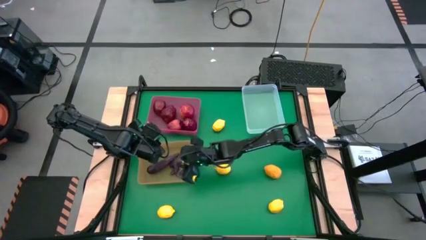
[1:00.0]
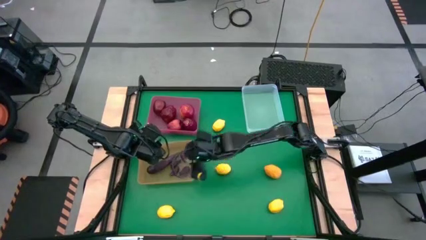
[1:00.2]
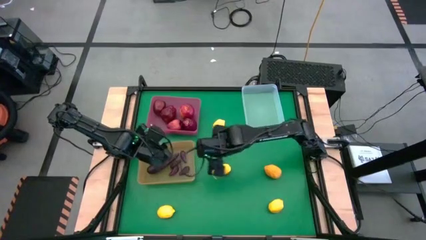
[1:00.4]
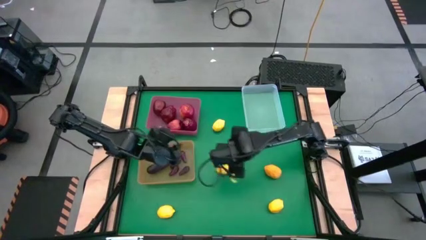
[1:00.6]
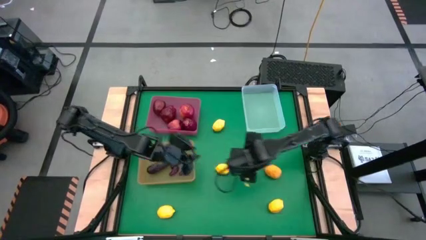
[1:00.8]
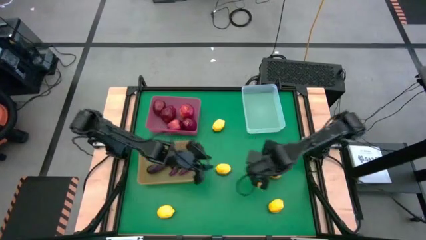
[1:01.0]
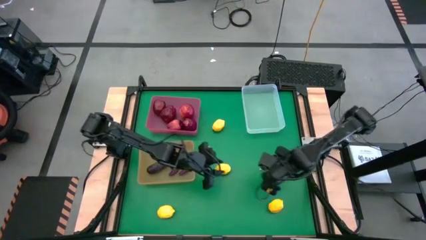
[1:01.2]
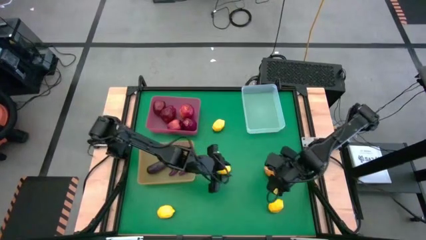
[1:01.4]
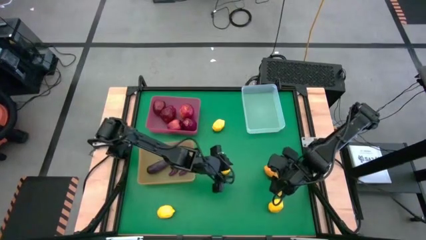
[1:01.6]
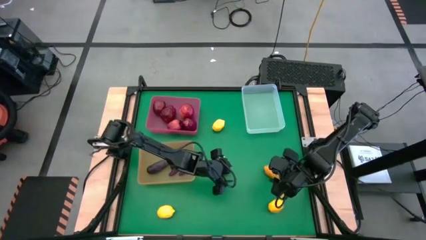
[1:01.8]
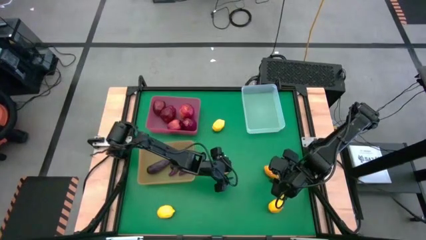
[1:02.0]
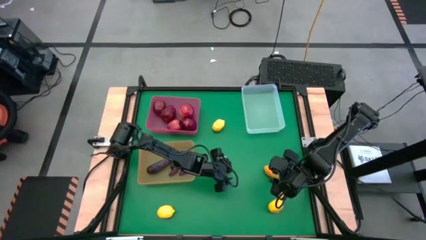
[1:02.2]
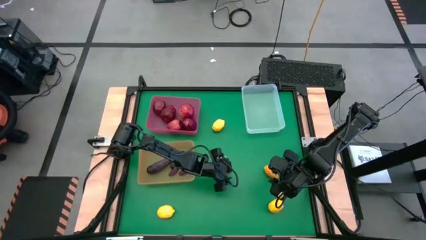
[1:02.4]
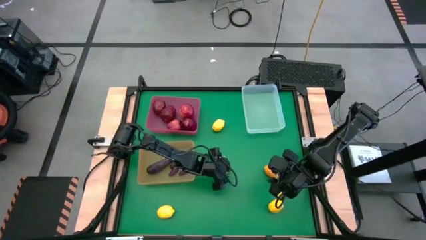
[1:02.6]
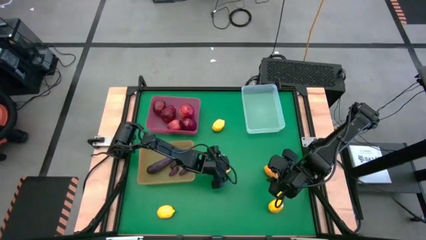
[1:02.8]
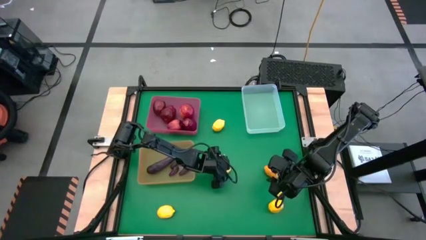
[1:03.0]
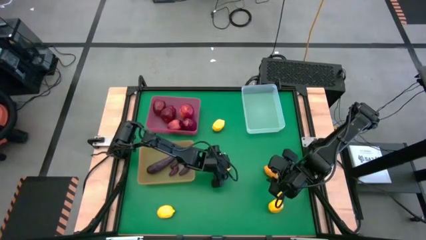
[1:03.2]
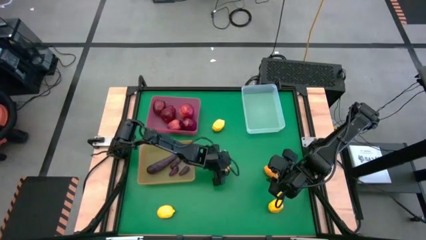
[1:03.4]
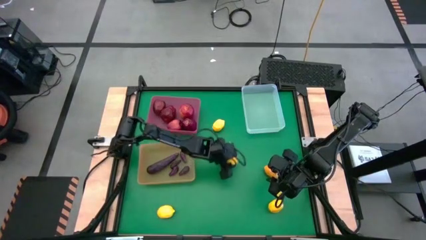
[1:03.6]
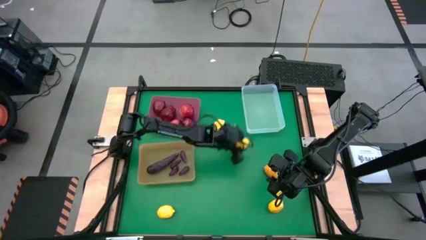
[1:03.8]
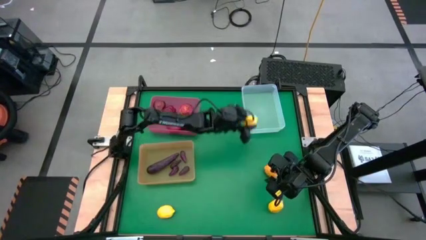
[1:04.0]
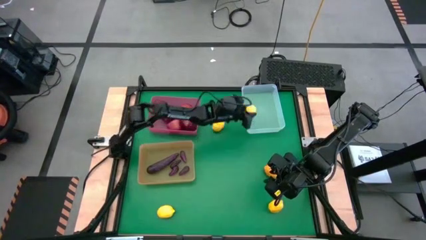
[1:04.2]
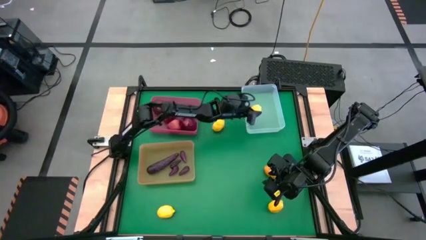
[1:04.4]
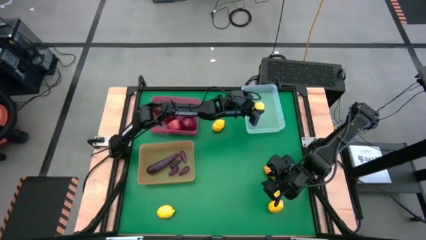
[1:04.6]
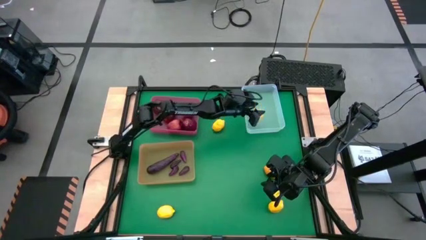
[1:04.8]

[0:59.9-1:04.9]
Task: Sort produce into baskets
Put the lemon into the transparent bin

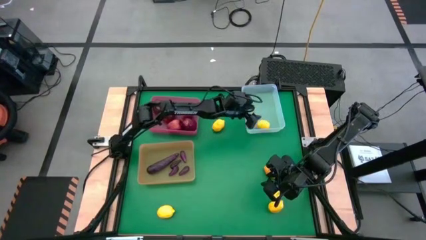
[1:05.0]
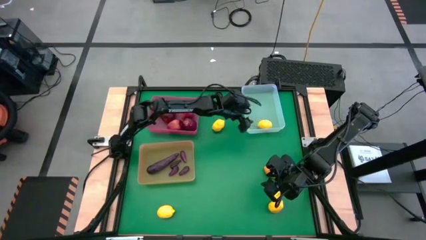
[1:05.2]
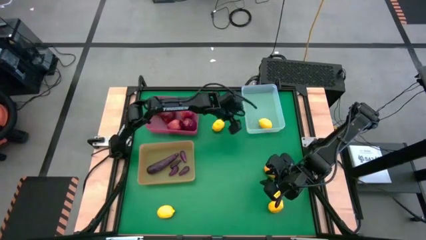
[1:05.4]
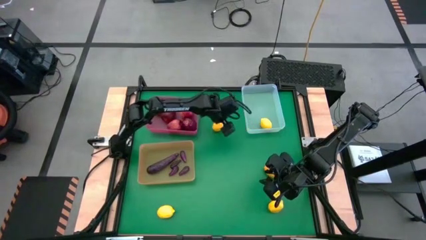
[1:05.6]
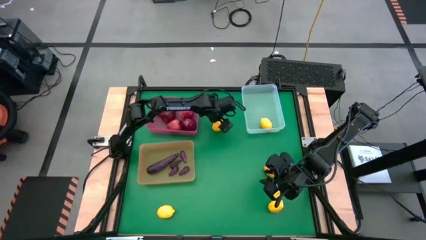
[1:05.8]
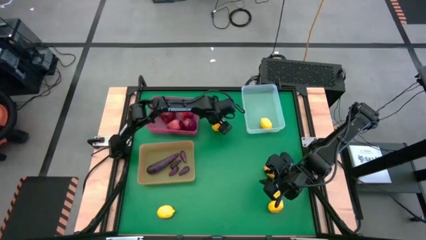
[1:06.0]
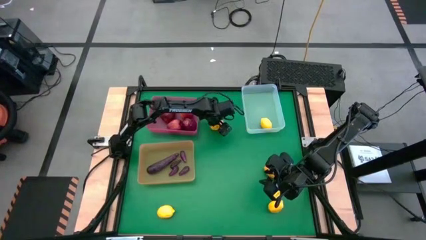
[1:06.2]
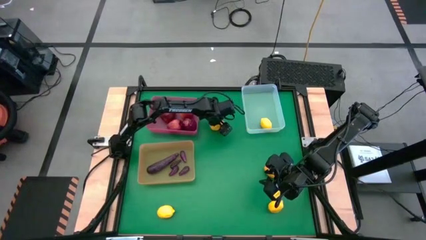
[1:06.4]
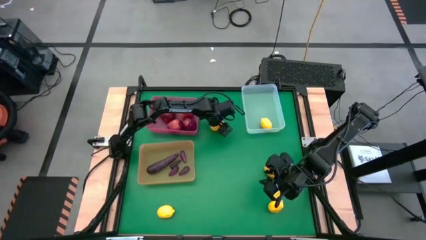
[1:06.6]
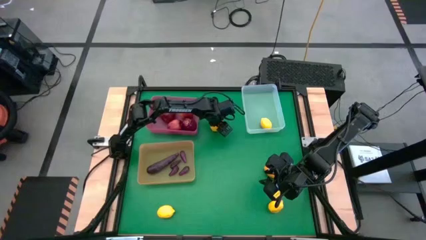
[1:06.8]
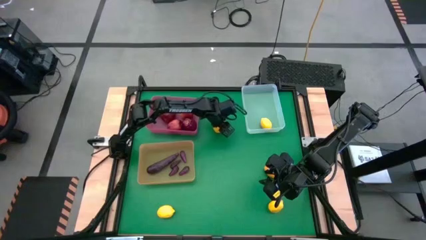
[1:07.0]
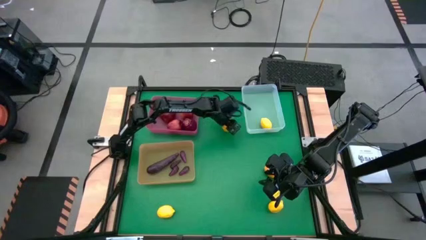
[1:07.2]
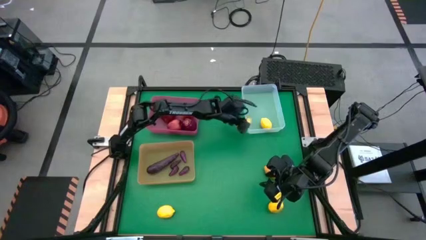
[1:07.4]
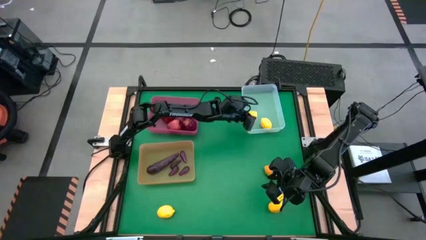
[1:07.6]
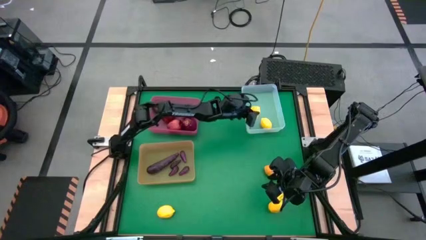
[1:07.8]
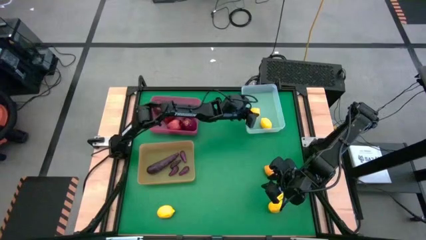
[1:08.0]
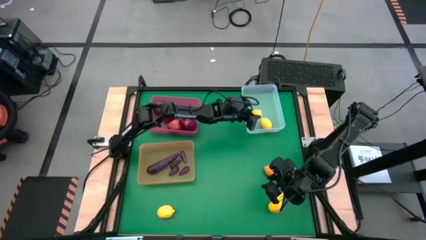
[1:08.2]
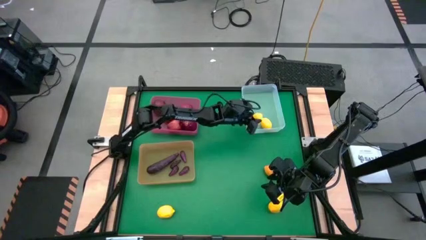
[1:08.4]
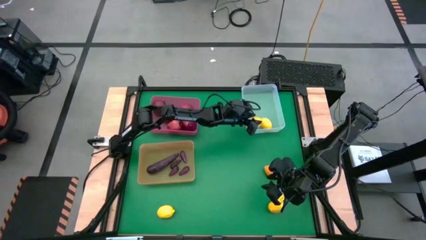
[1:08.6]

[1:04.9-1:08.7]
Put the lemon into the transparent bin

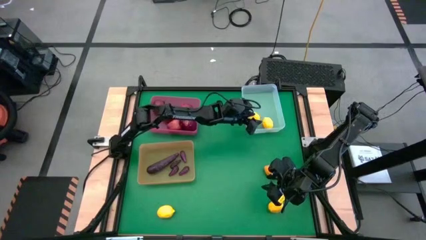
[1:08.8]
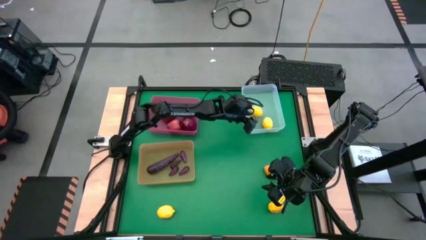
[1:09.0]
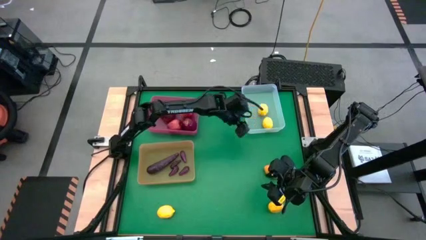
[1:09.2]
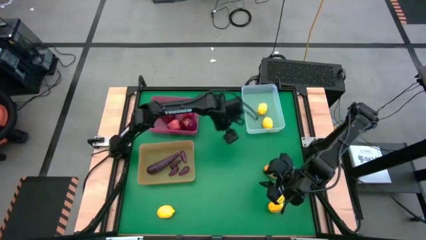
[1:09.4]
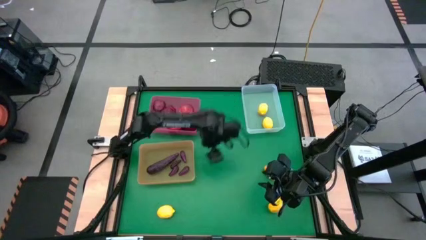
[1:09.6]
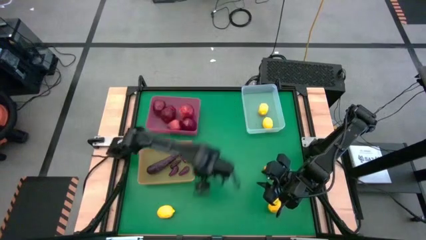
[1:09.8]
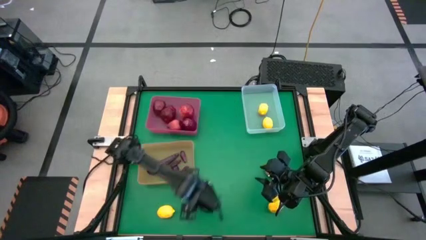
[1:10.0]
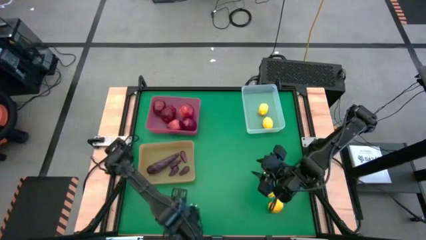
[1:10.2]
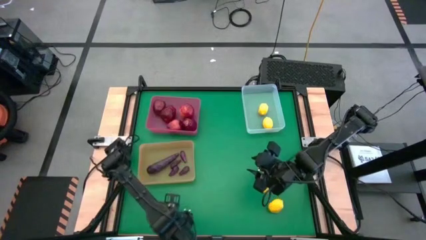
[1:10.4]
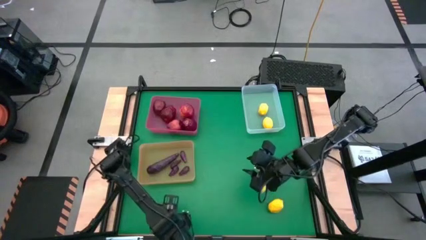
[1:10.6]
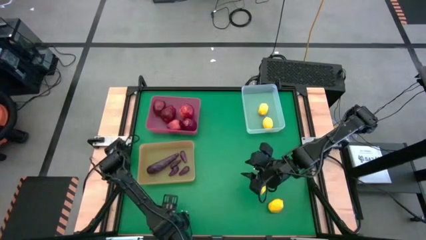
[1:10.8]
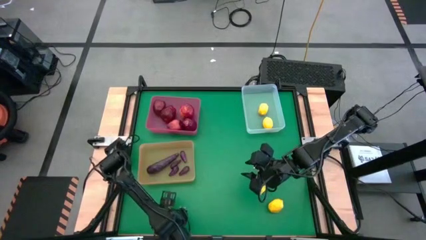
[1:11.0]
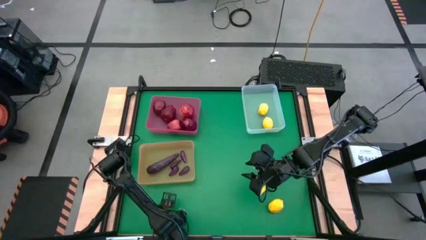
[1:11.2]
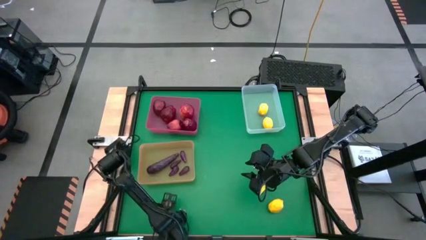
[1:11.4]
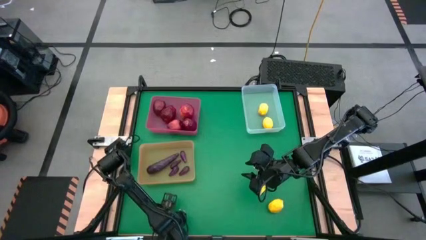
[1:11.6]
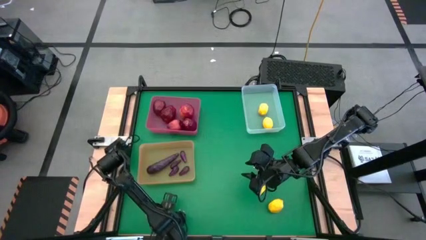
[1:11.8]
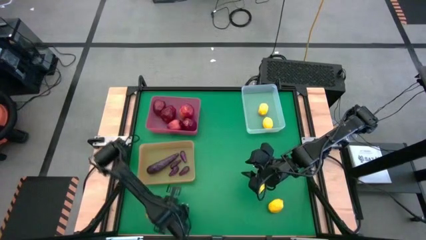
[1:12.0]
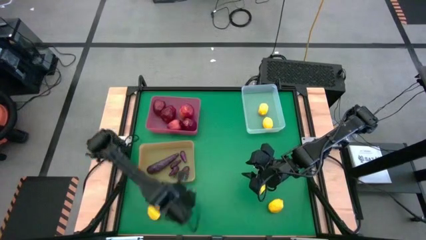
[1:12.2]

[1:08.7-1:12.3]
Put the lemon into the transparent bin

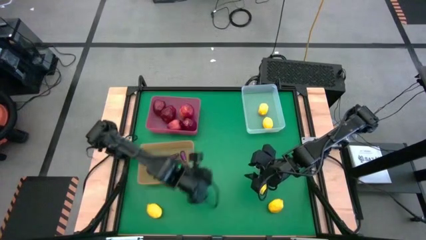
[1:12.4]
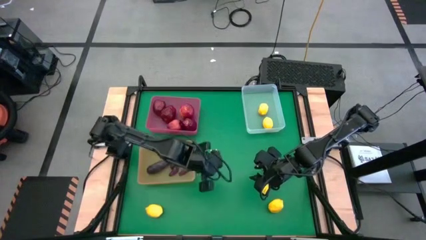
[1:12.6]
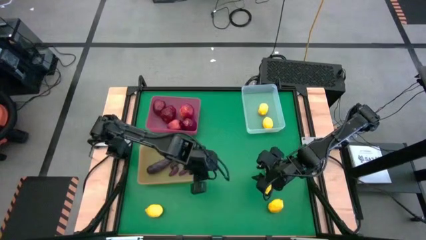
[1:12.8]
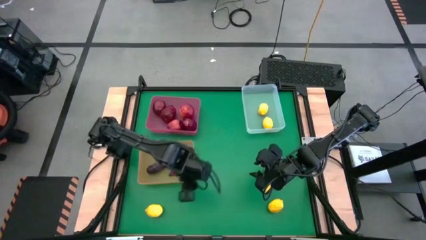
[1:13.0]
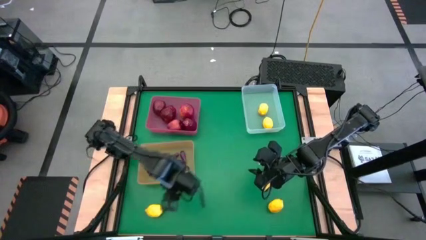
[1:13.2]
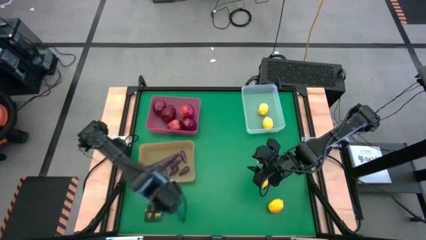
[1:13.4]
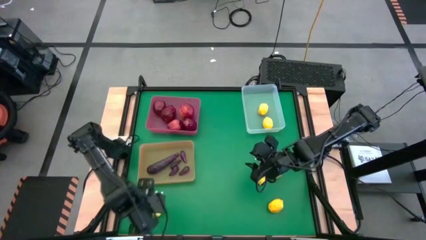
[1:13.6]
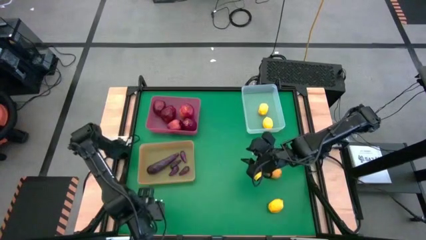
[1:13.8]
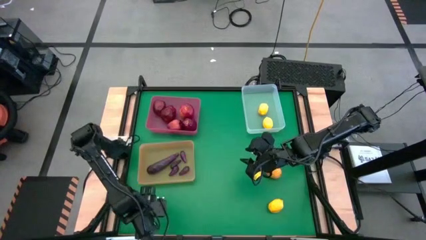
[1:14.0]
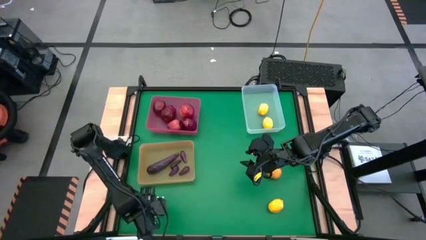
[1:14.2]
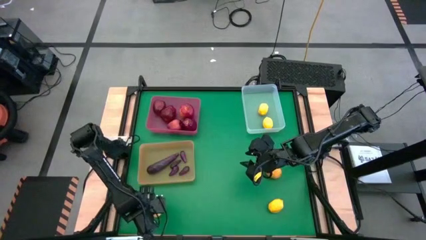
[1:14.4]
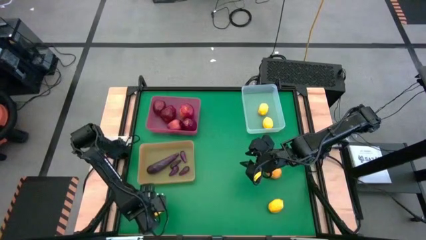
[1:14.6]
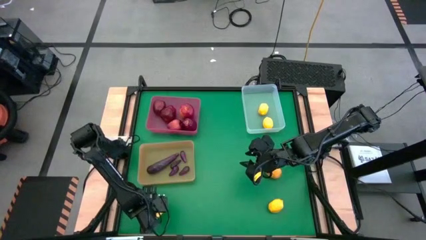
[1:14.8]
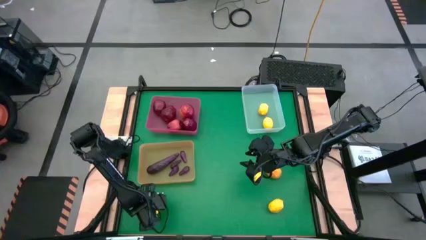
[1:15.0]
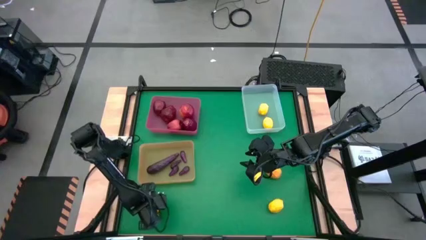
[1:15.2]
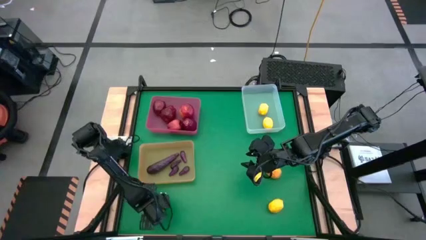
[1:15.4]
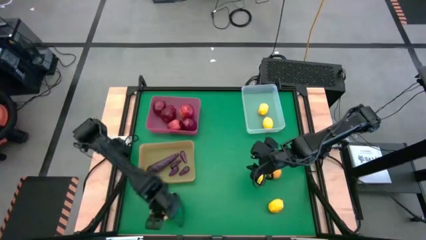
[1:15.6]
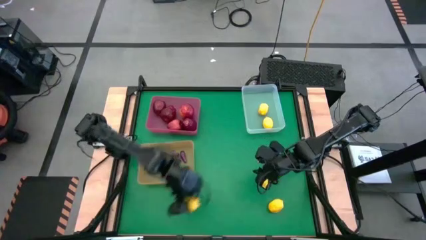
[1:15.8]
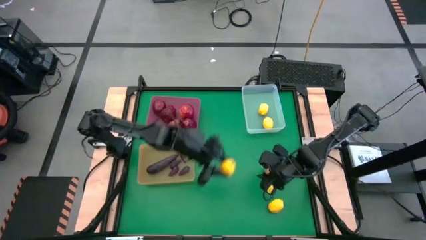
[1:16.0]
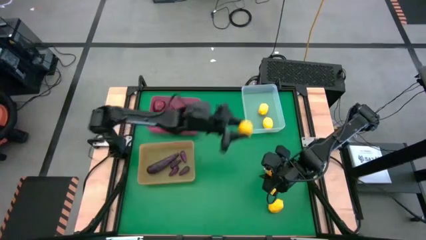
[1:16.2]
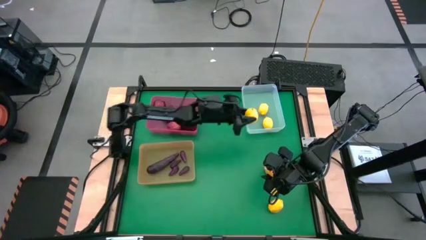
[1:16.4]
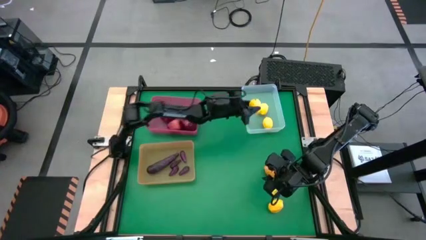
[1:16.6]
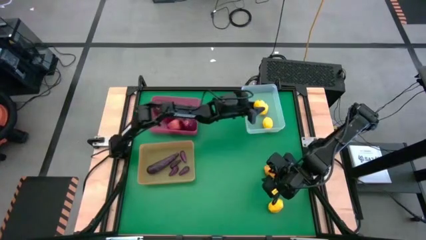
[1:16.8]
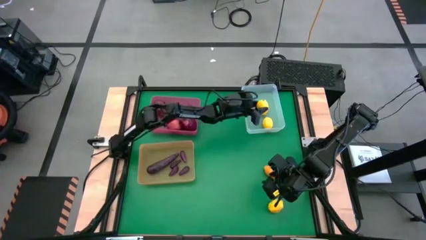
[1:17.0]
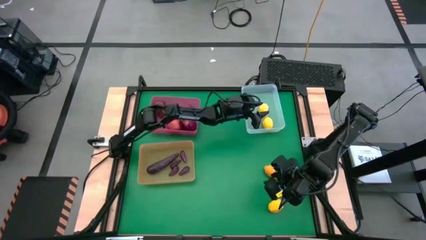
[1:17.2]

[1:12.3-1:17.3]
Put the lemon into the transparent bin
